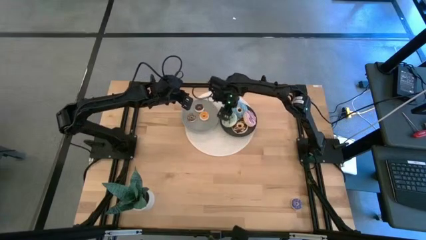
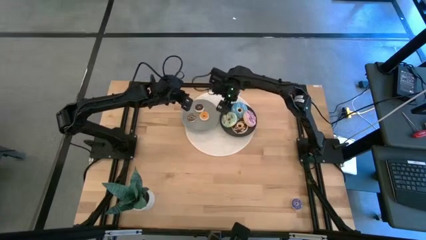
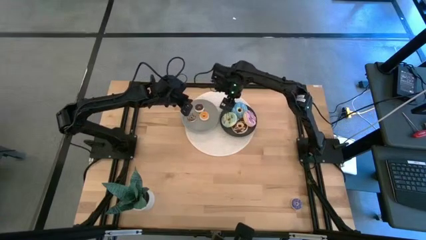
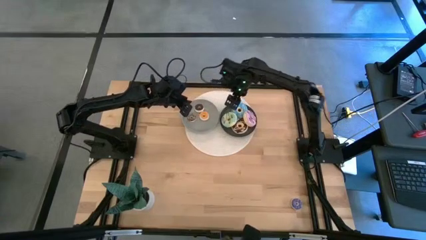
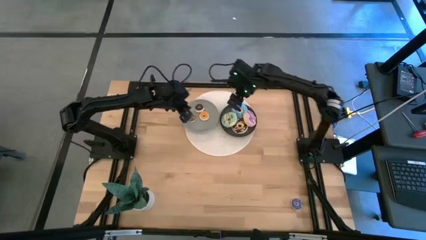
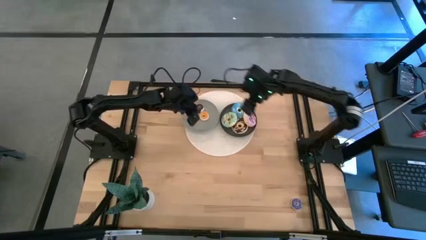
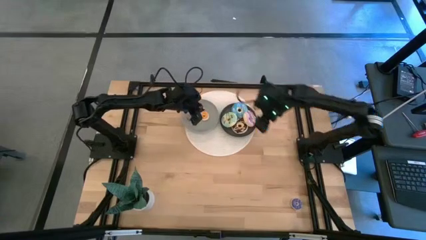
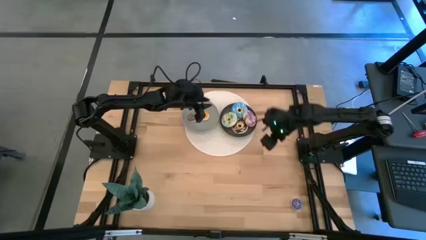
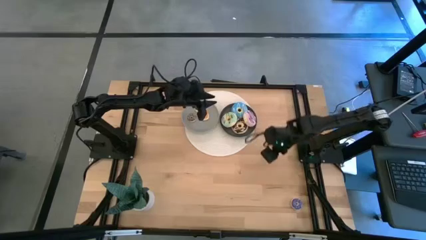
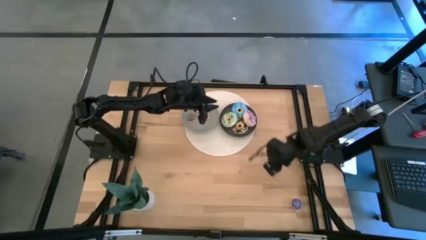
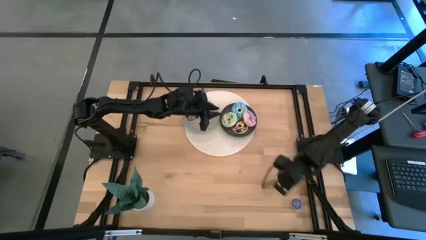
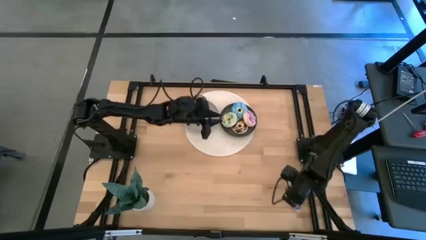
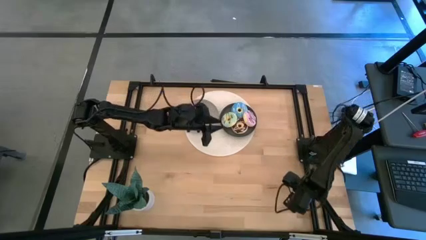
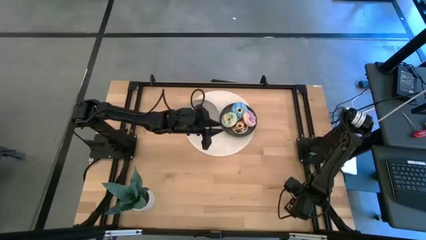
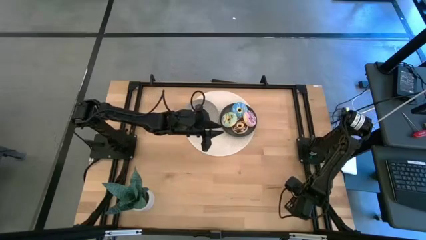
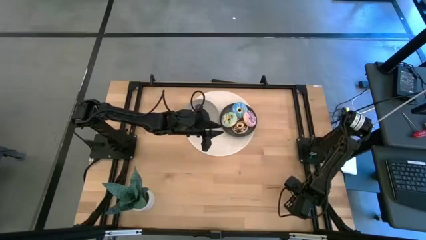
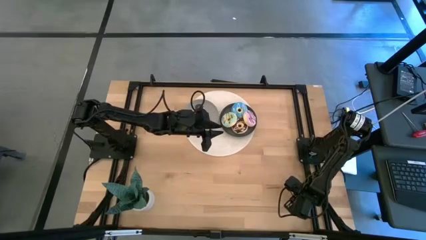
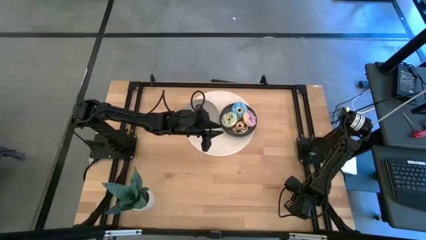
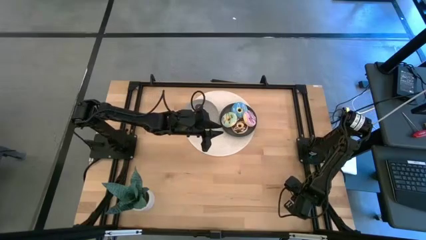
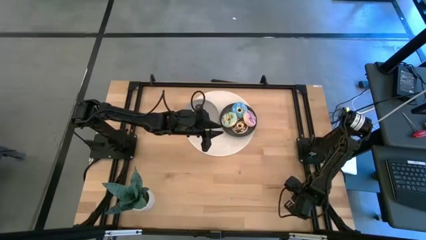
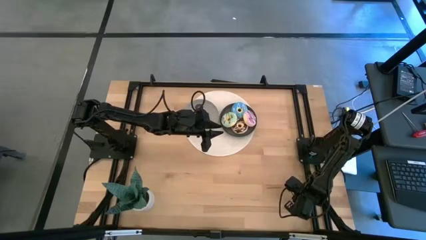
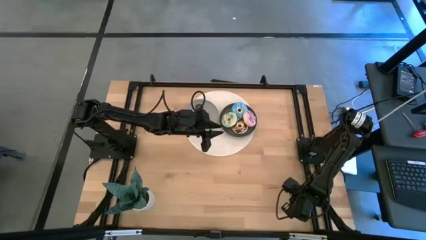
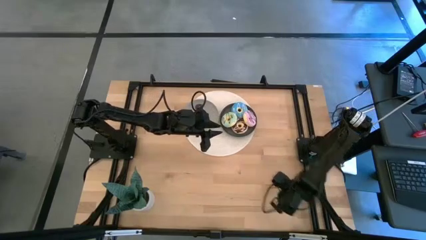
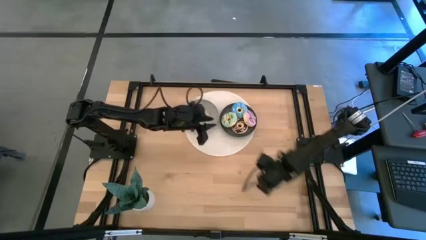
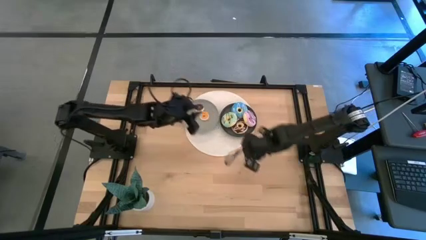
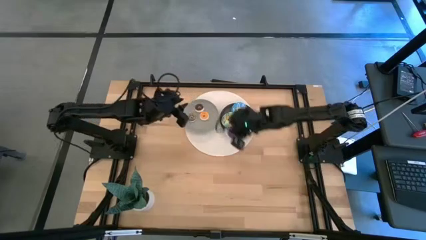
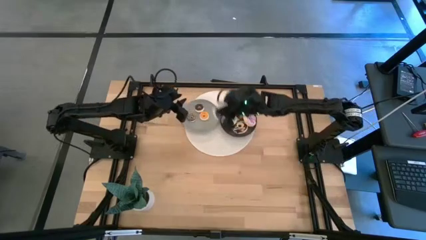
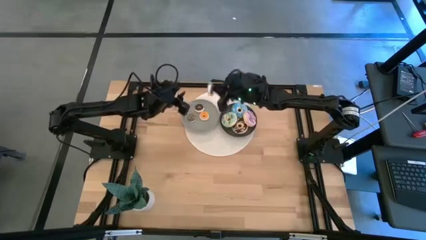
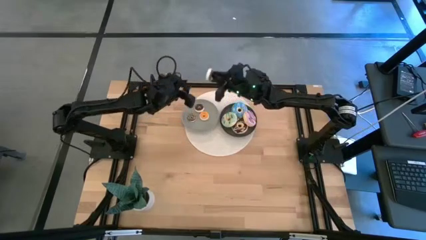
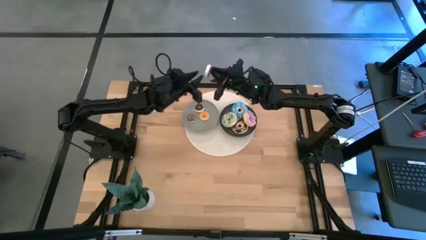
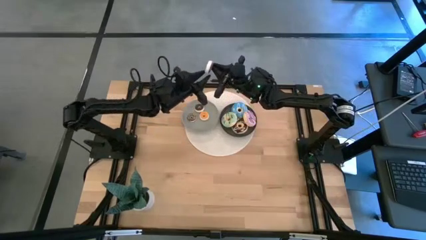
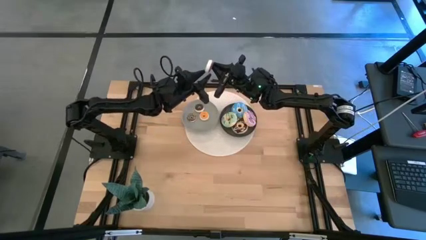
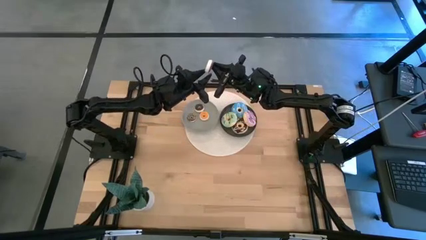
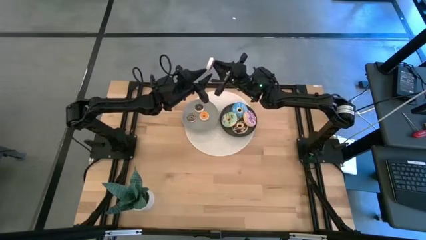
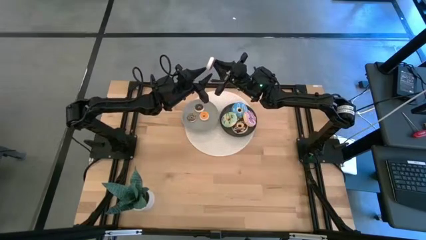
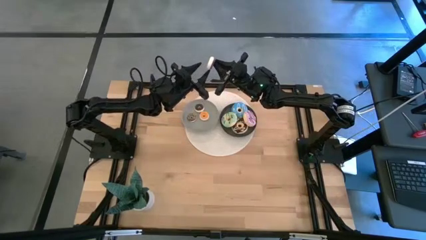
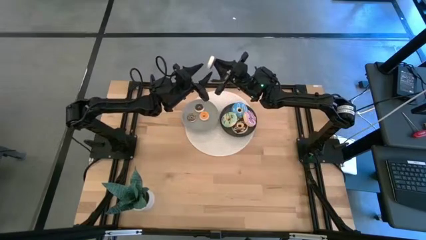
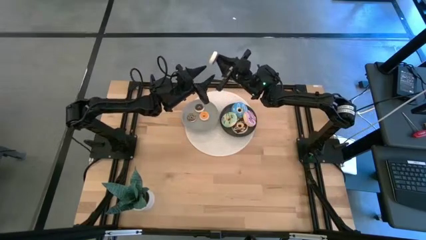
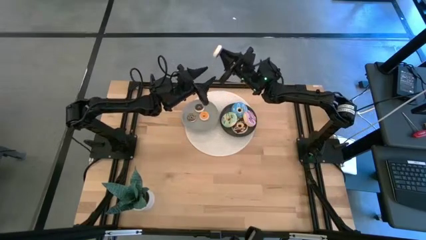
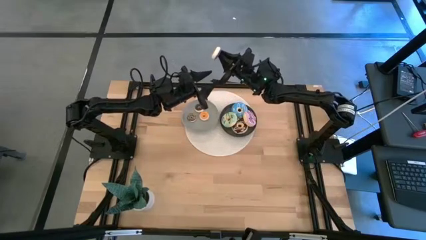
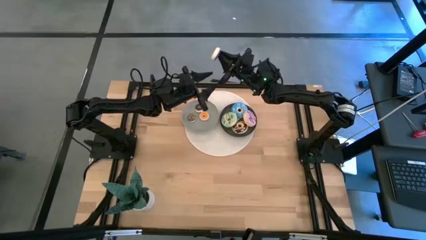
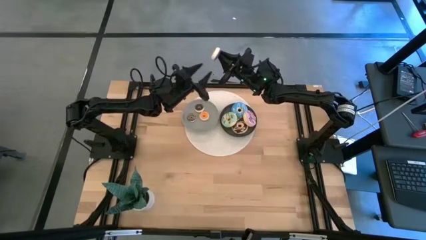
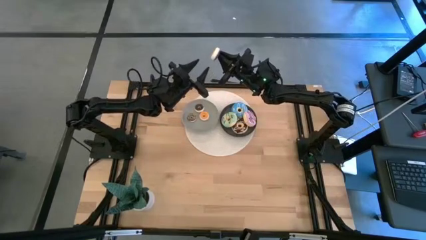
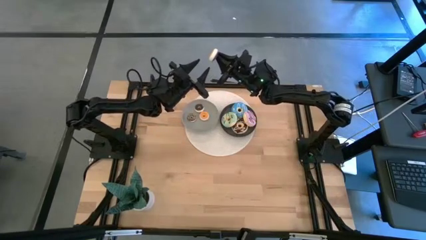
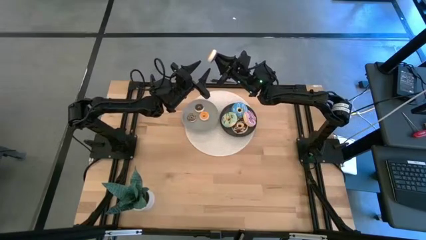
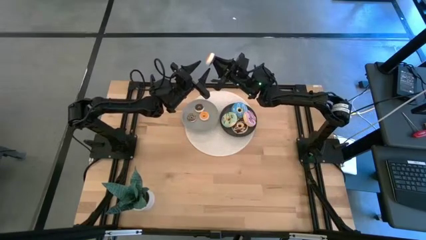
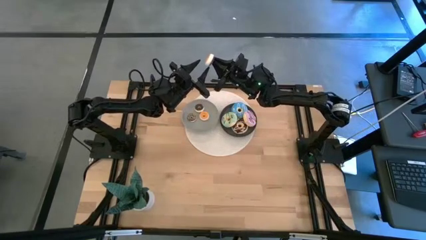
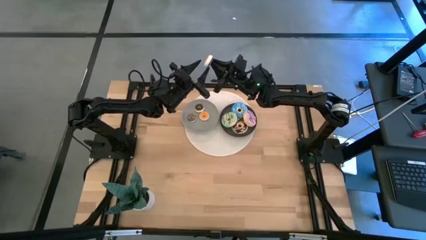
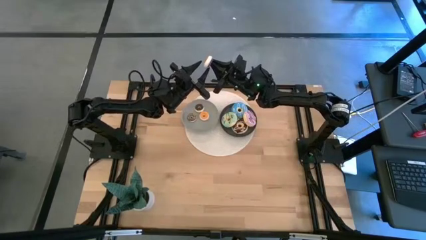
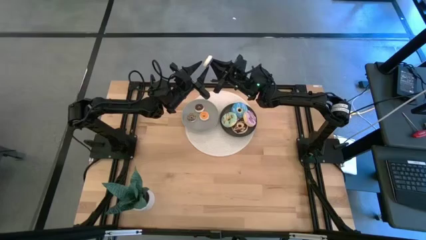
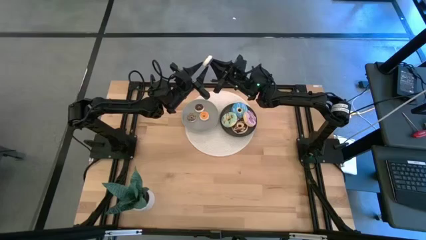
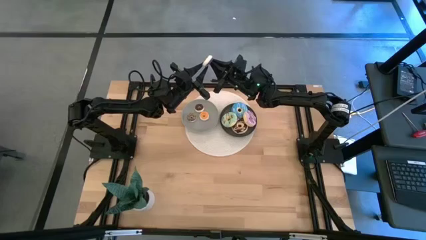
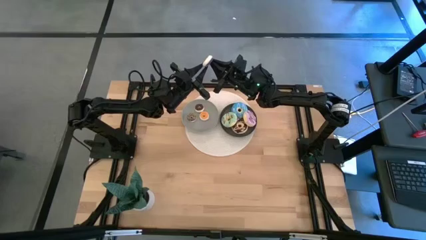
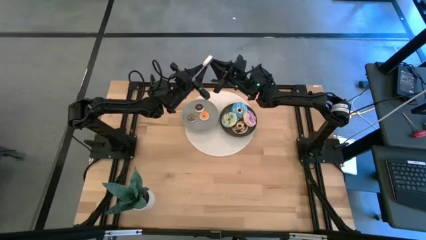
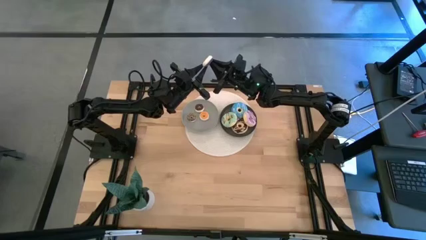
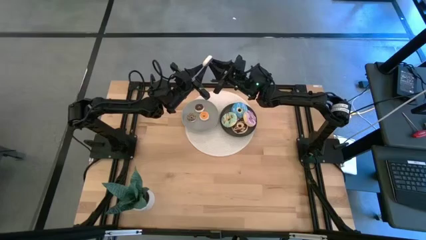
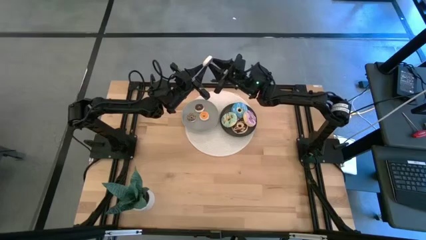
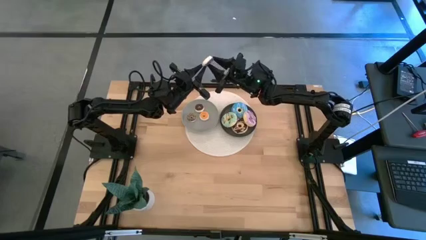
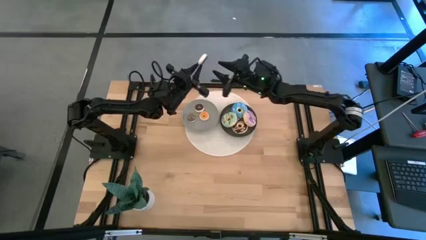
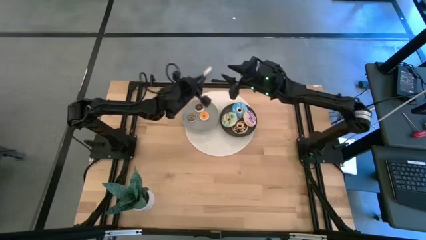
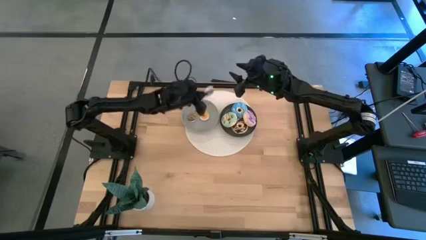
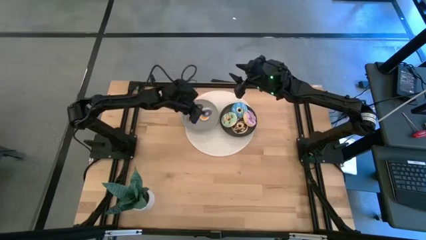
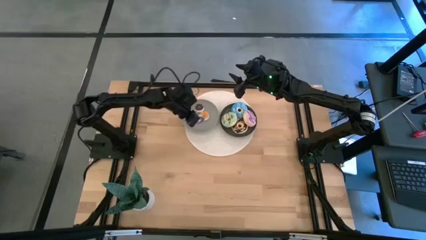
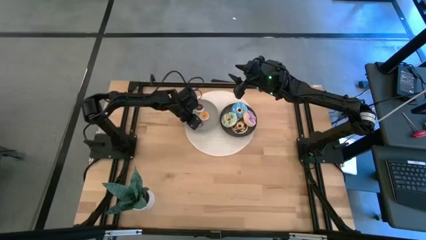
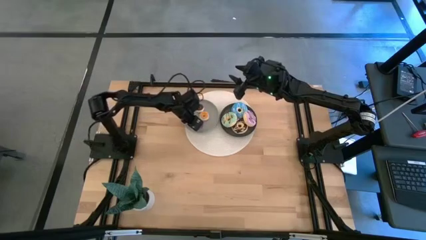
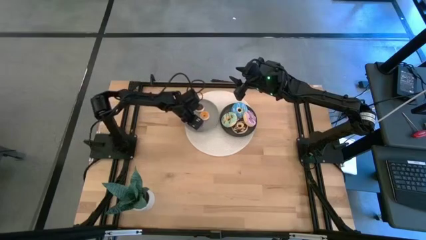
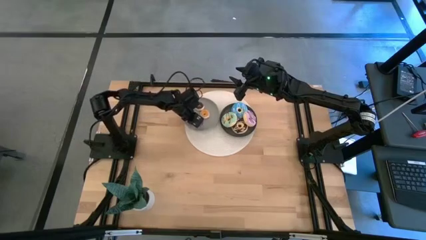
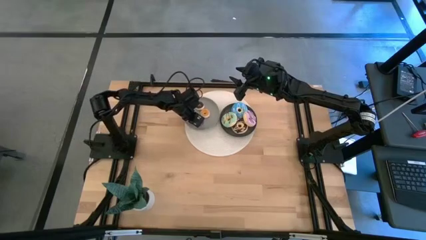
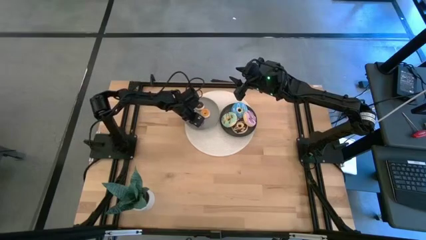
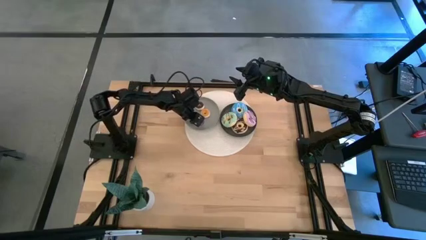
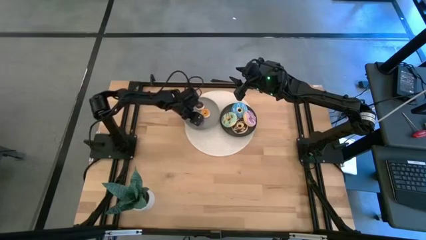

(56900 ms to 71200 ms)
Task: Pick & Place donuts
Put the small purple donut on the gray bin
